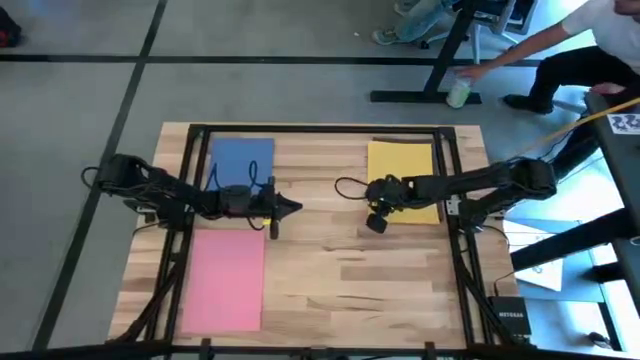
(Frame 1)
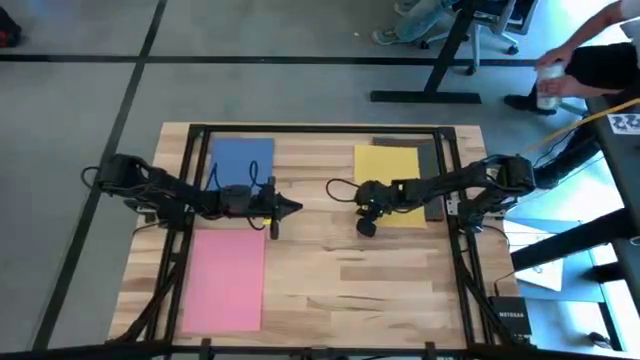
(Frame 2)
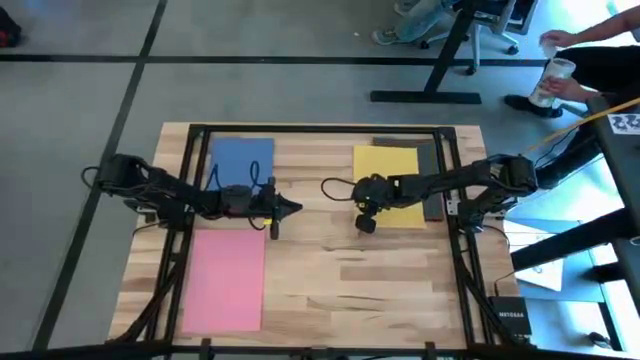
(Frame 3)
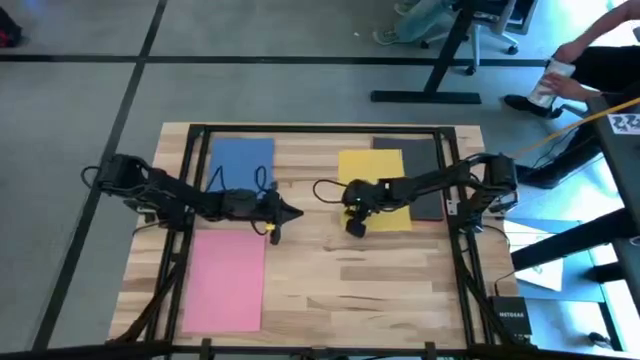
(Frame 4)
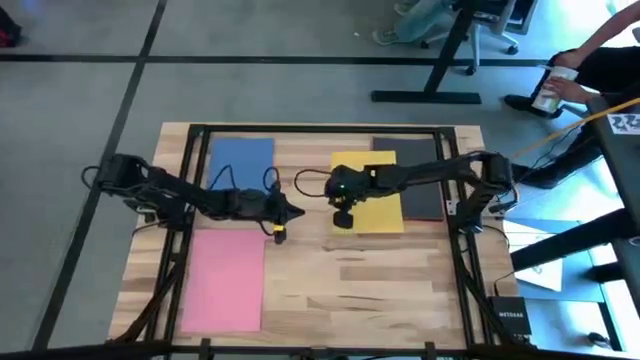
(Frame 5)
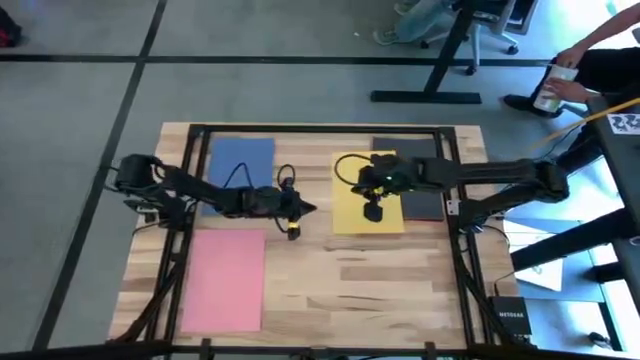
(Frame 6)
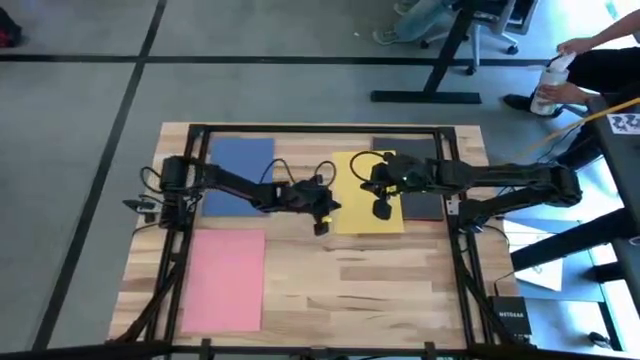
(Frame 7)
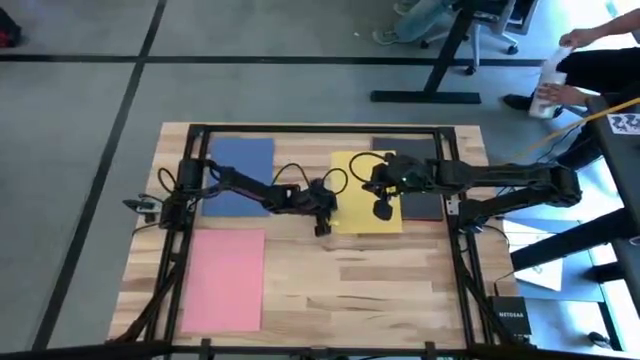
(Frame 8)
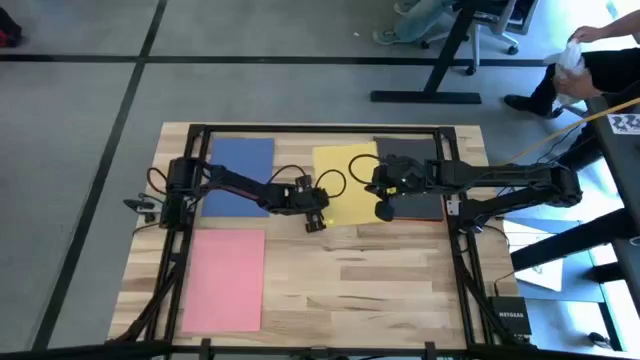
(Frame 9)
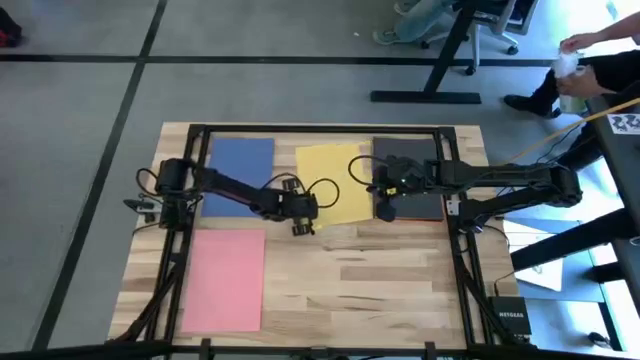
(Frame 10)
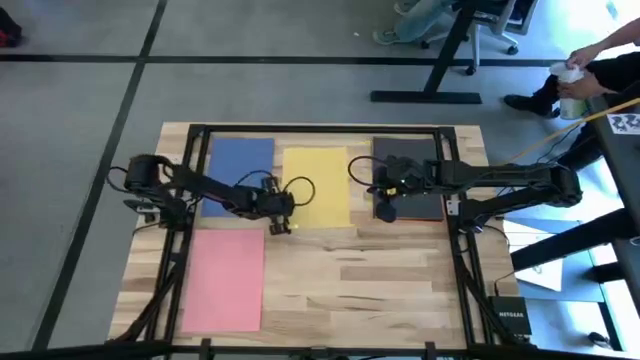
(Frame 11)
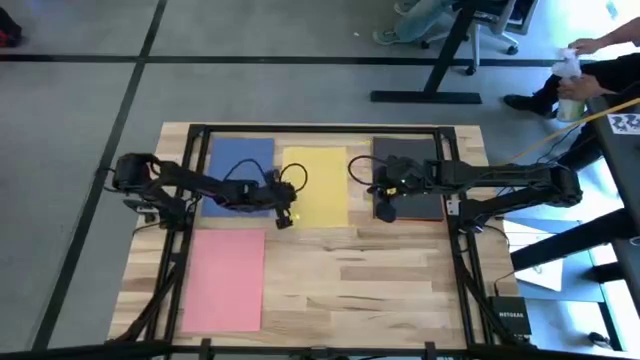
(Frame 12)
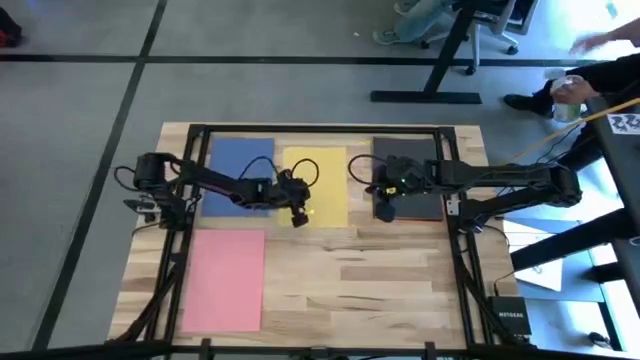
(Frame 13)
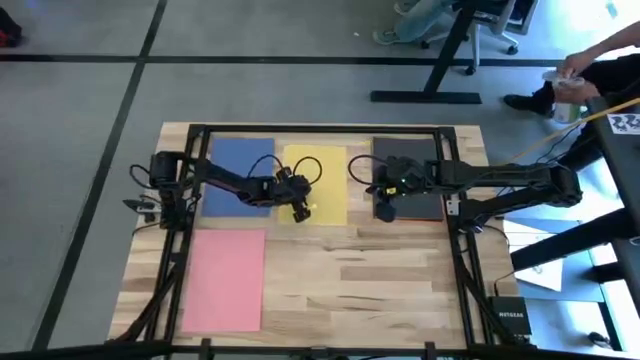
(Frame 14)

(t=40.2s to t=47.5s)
Task: Organize paper
Move the yellow paper to the top center of the table

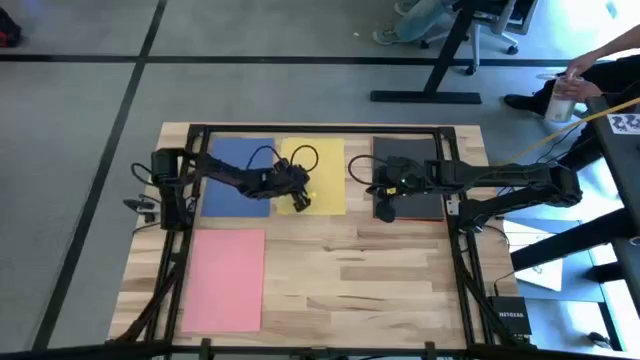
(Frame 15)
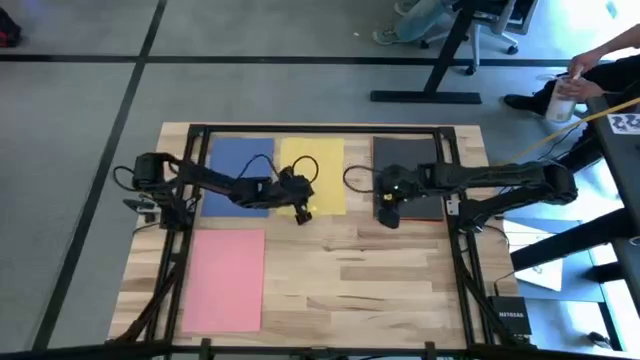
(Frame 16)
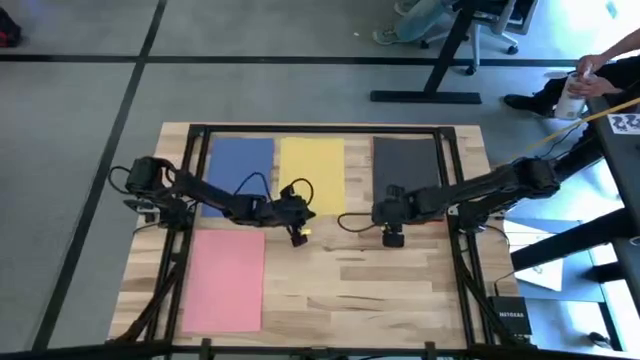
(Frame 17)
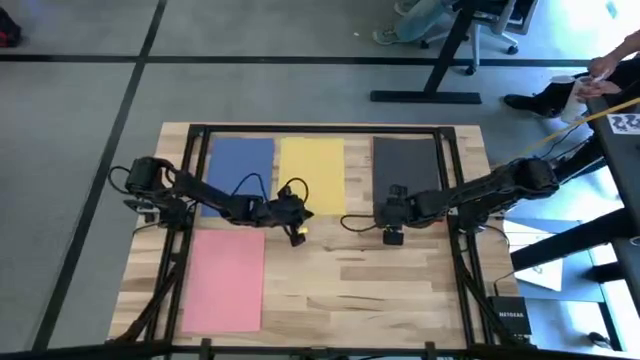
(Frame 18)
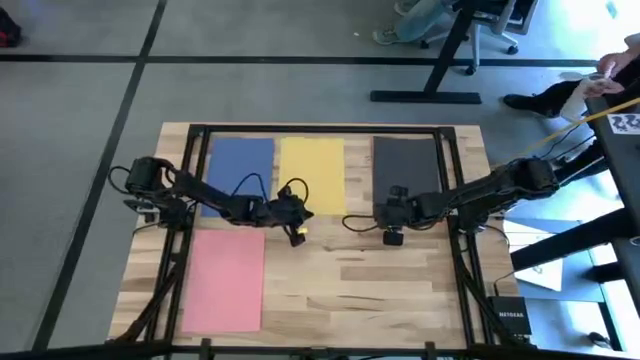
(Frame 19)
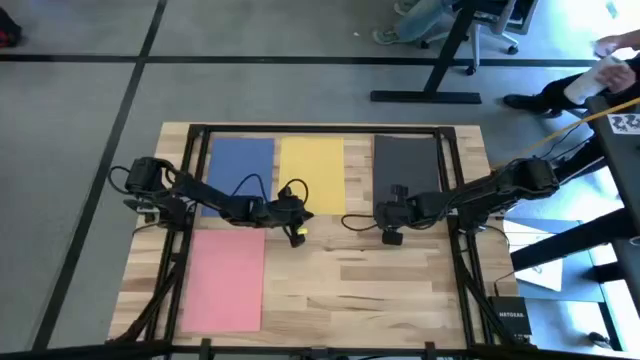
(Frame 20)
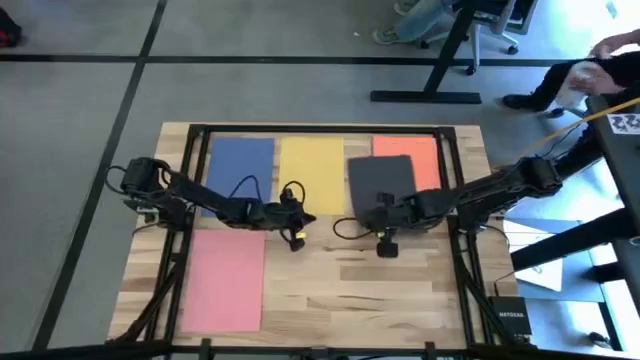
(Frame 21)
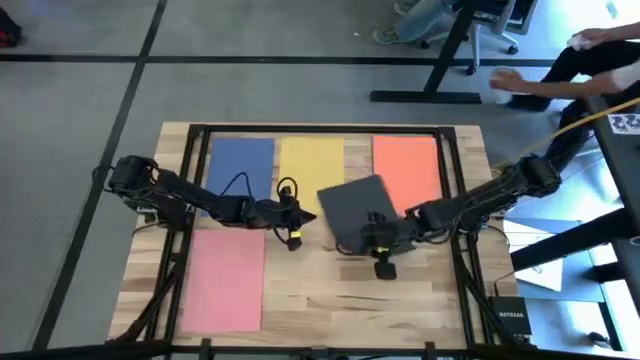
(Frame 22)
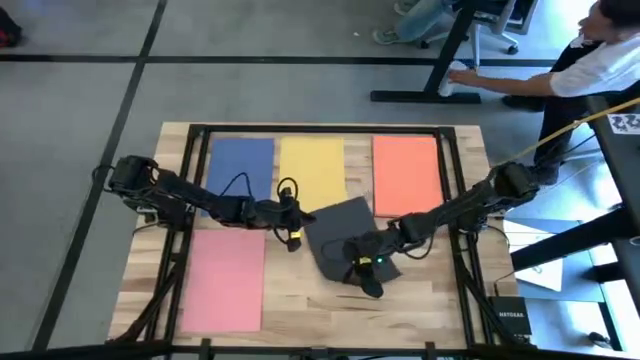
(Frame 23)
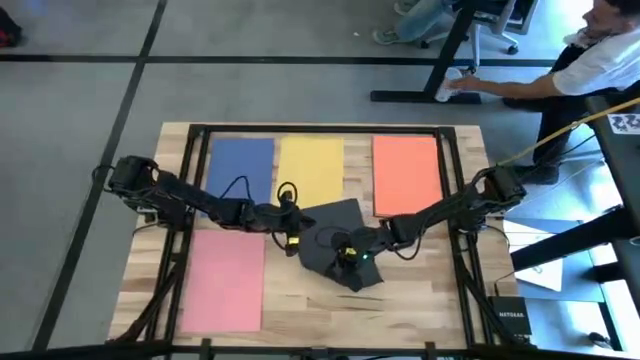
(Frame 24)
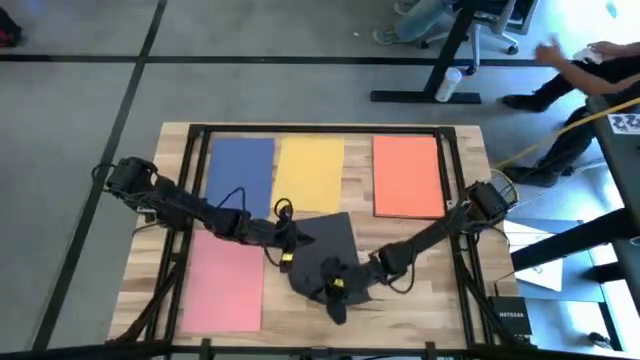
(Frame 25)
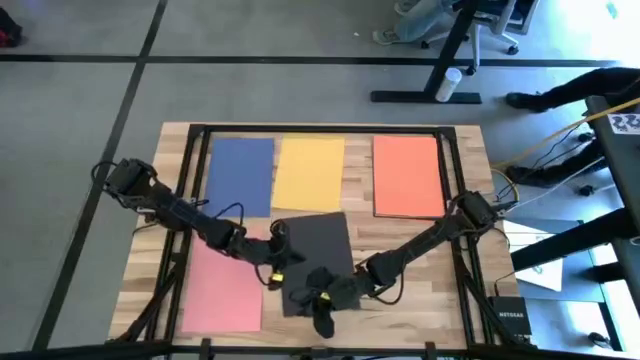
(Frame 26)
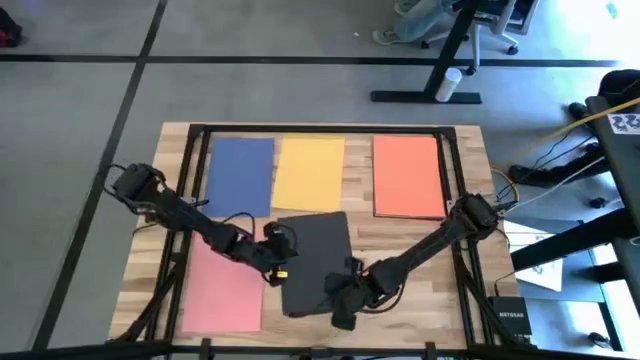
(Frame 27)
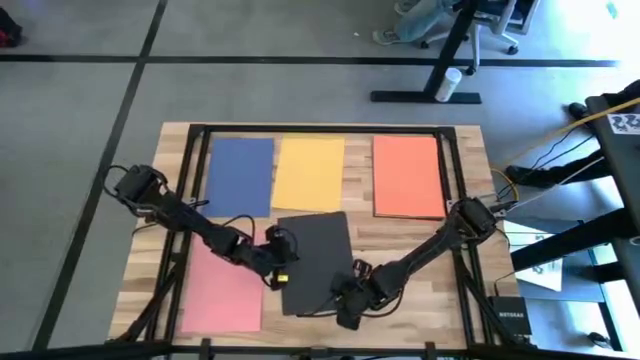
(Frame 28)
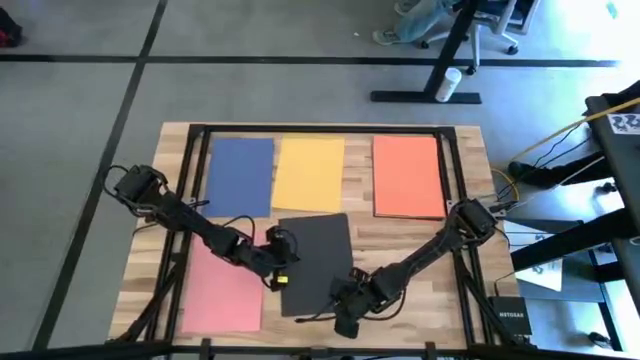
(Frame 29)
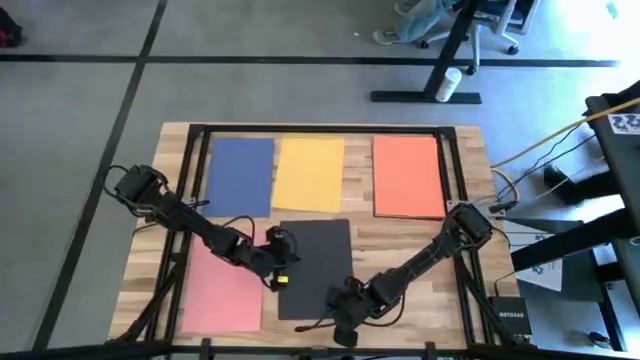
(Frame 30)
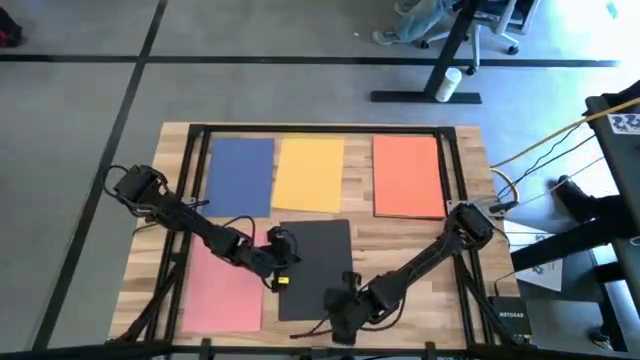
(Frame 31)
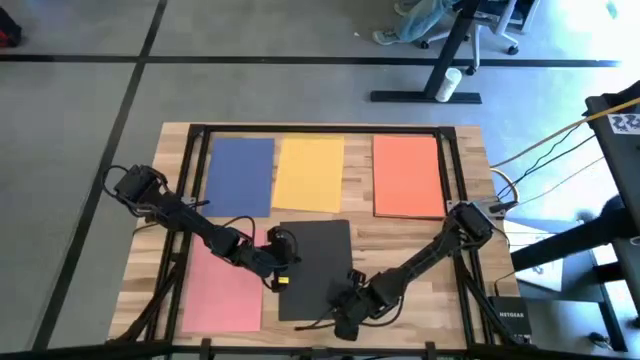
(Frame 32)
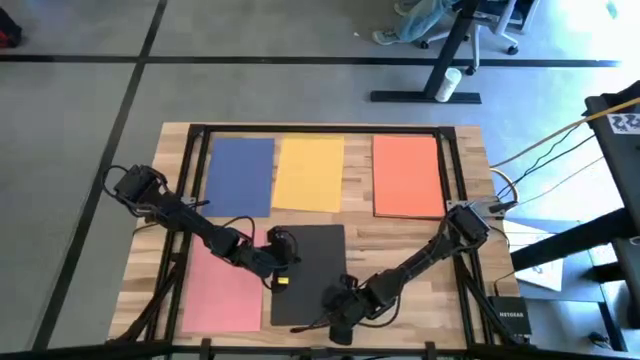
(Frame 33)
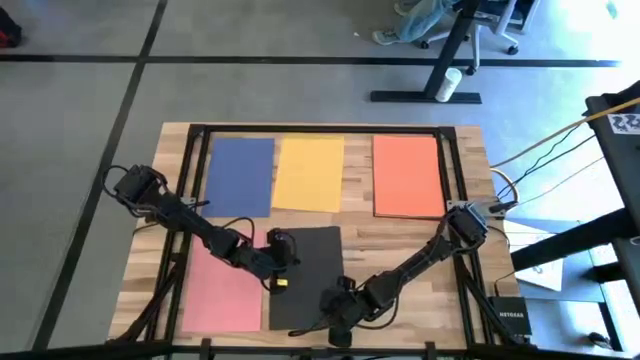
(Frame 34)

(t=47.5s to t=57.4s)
Move the black paper to the bottom center of the table

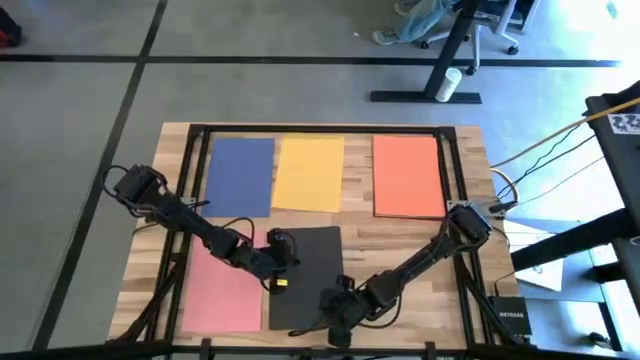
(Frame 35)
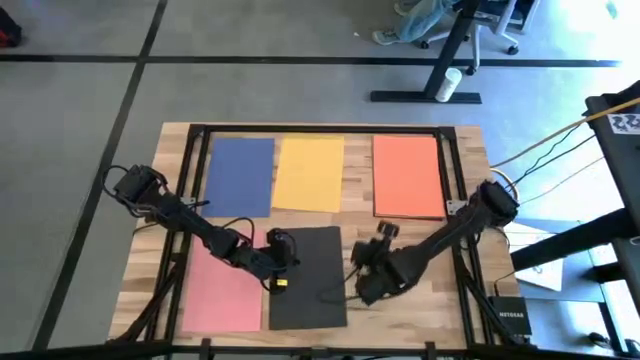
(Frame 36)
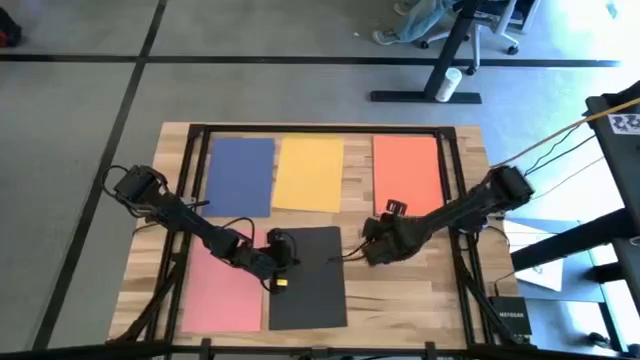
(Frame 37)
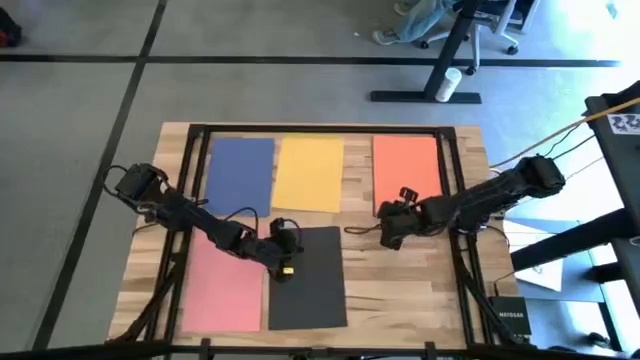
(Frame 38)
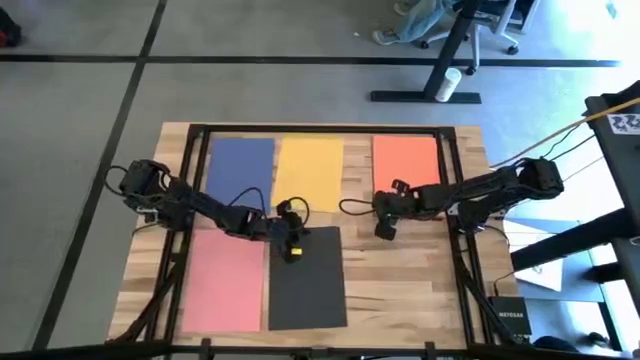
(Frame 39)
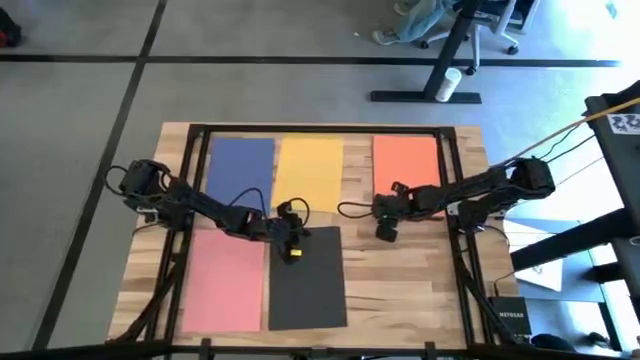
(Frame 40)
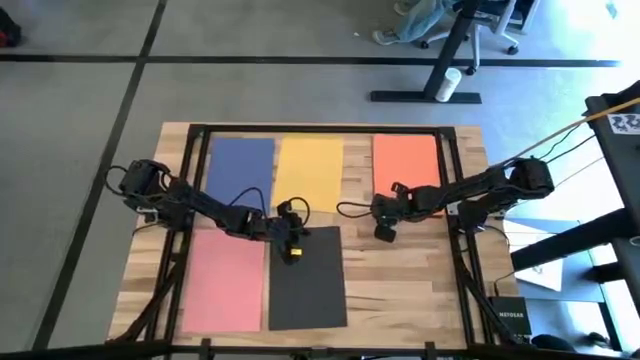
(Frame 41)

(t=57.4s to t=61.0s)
Move the orange paper to the bottom right of the table
